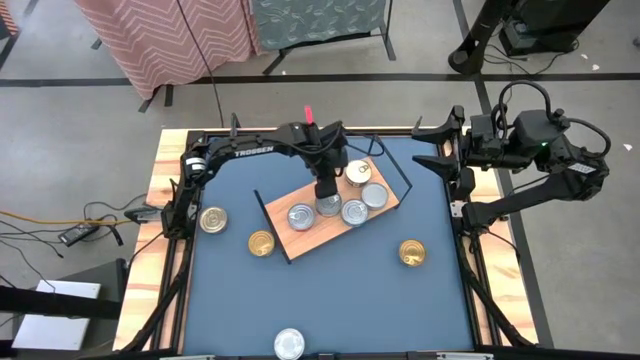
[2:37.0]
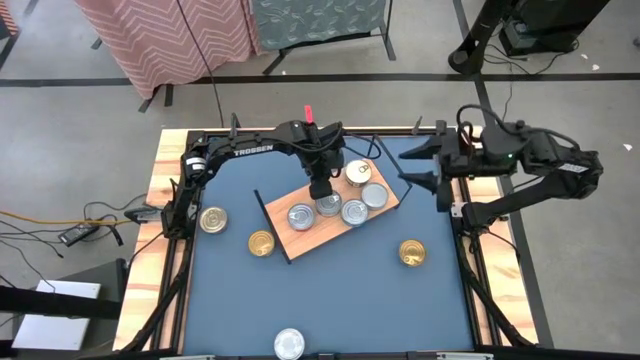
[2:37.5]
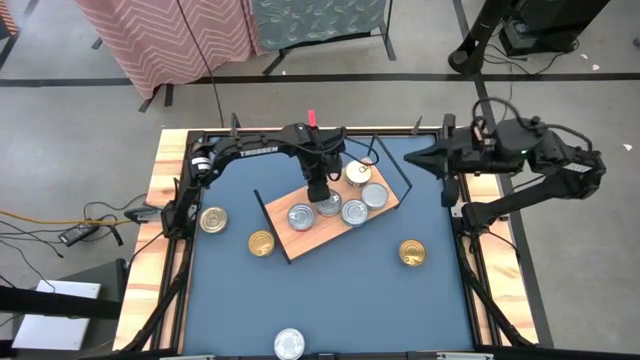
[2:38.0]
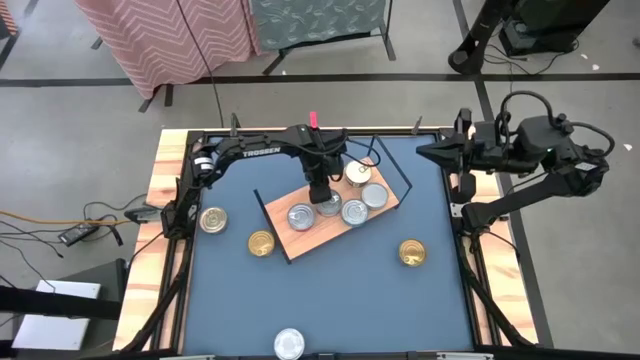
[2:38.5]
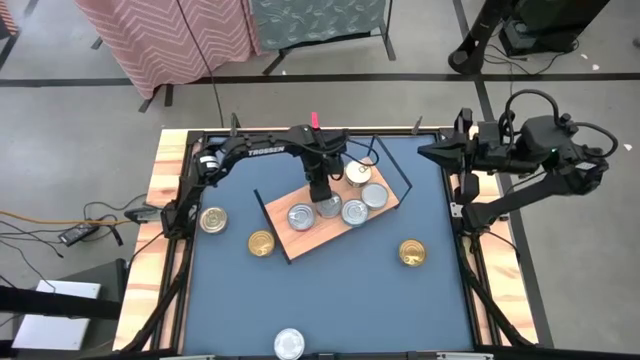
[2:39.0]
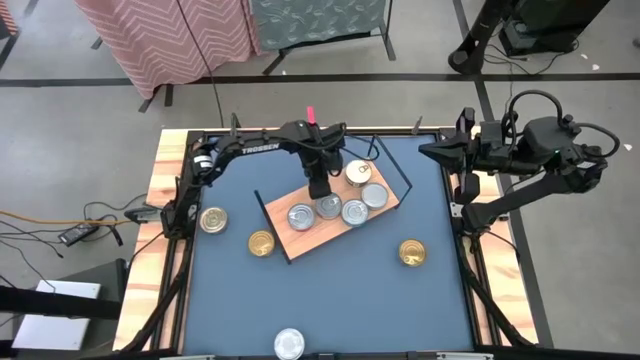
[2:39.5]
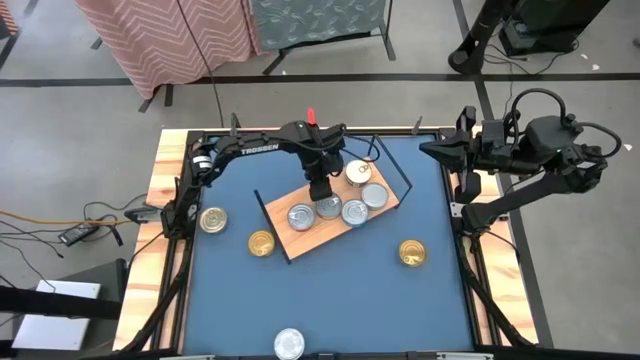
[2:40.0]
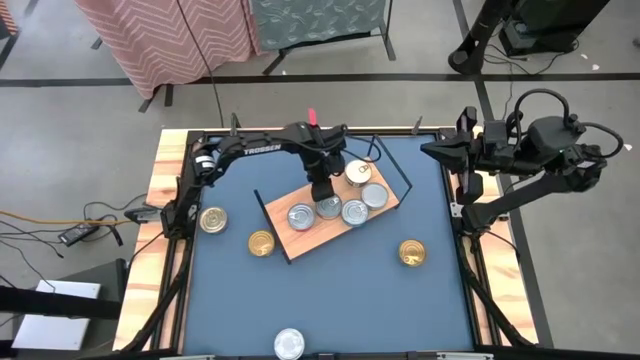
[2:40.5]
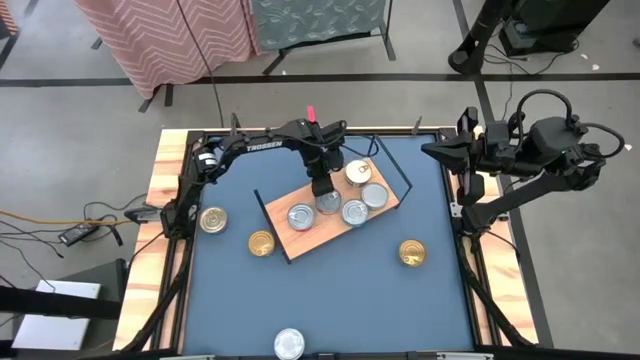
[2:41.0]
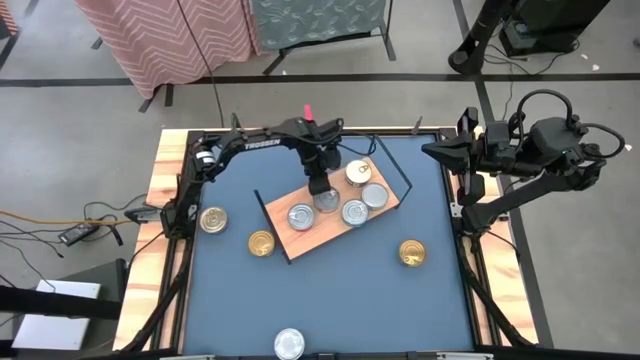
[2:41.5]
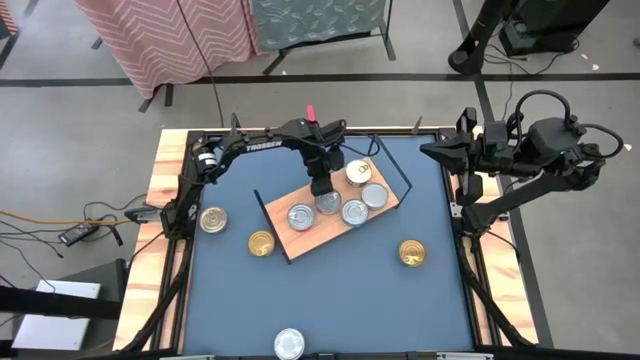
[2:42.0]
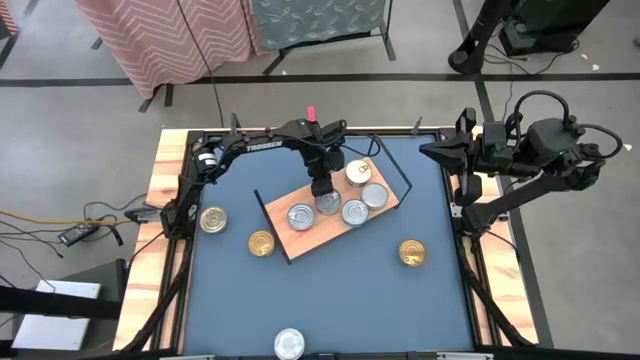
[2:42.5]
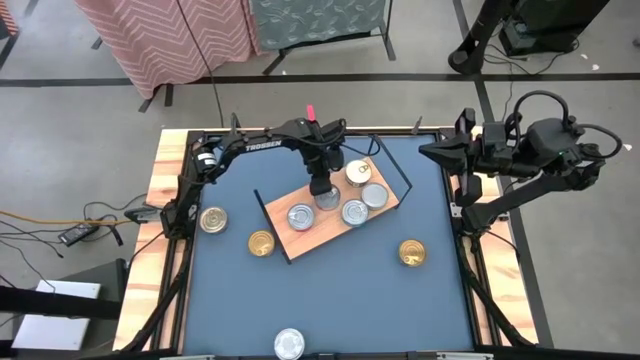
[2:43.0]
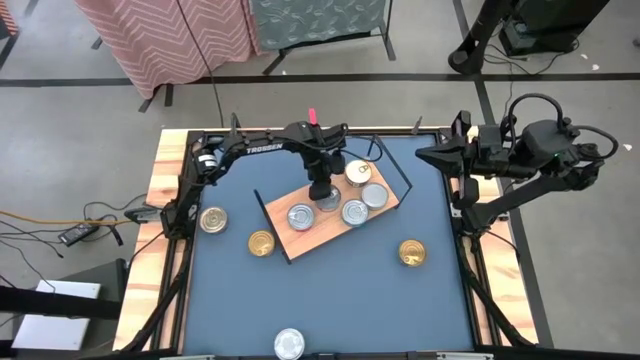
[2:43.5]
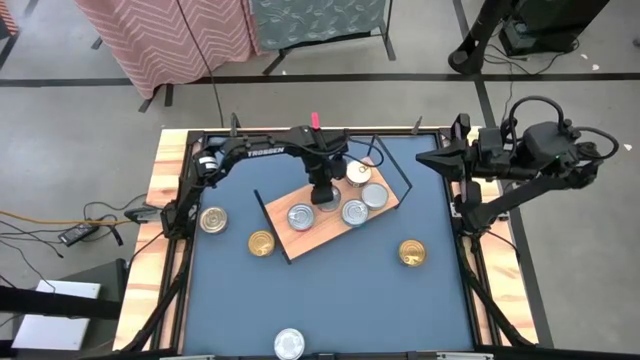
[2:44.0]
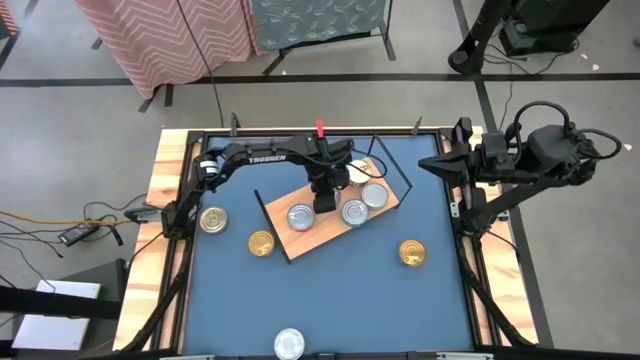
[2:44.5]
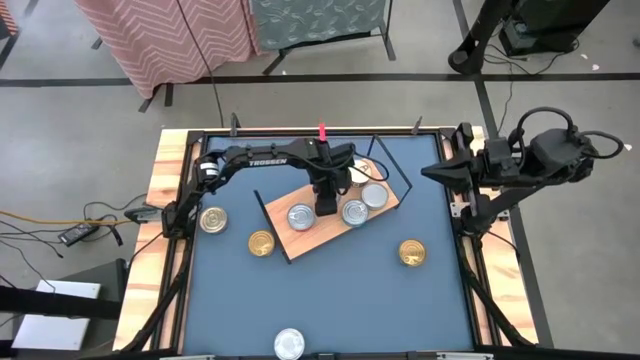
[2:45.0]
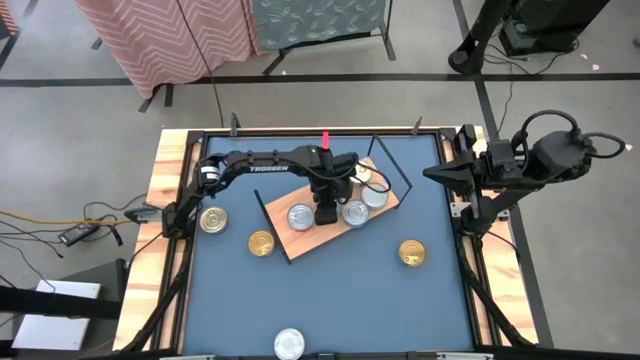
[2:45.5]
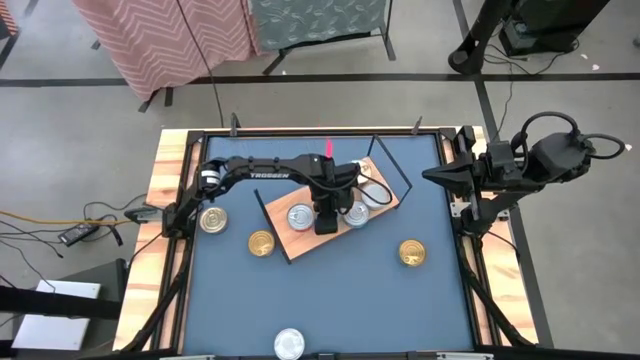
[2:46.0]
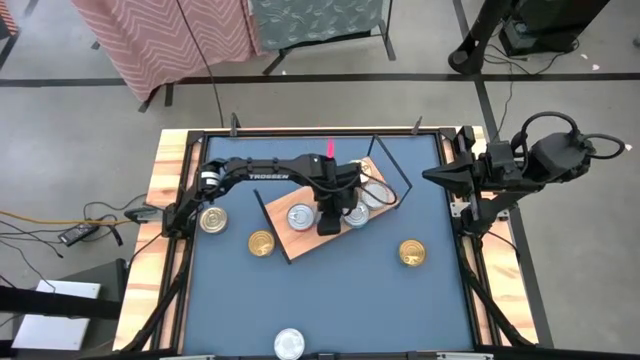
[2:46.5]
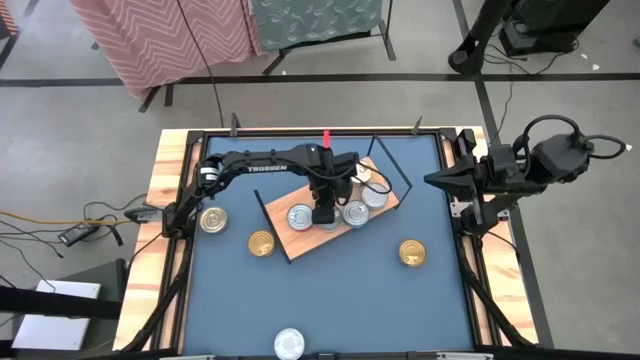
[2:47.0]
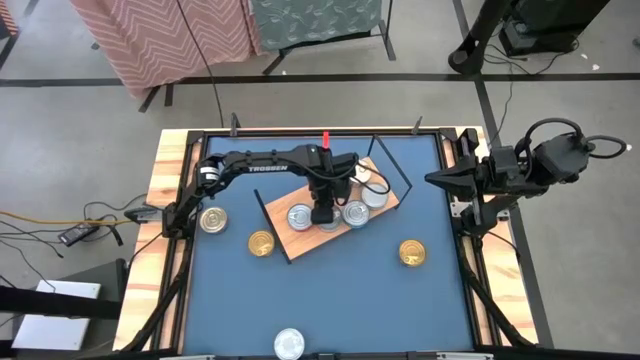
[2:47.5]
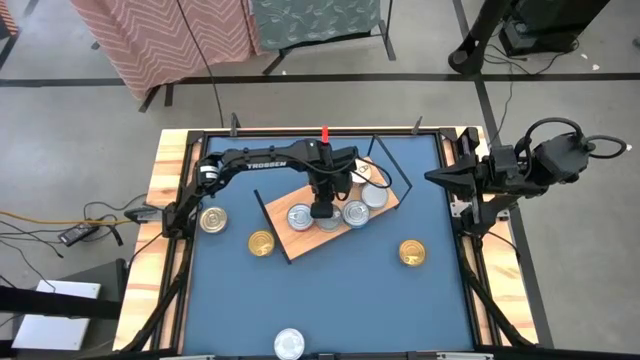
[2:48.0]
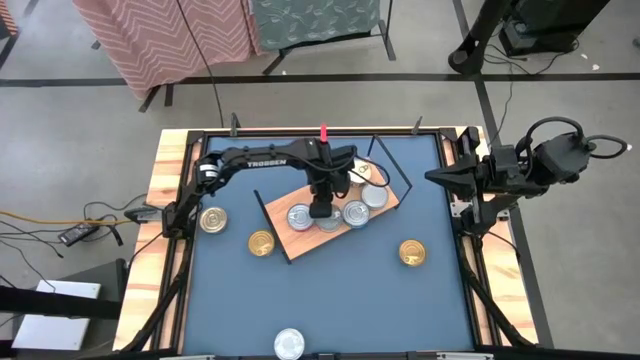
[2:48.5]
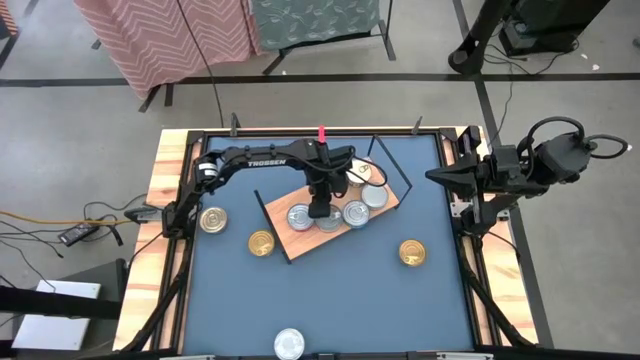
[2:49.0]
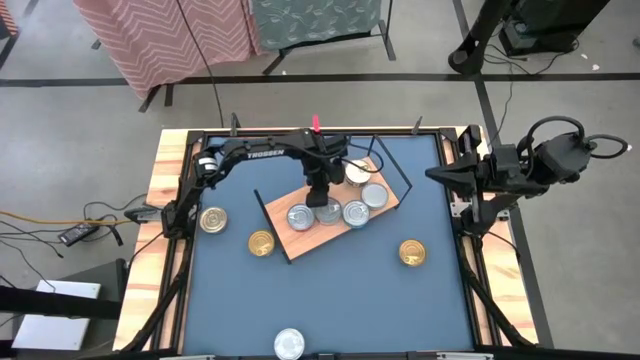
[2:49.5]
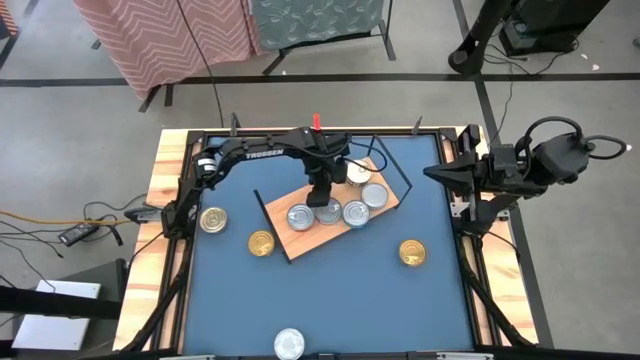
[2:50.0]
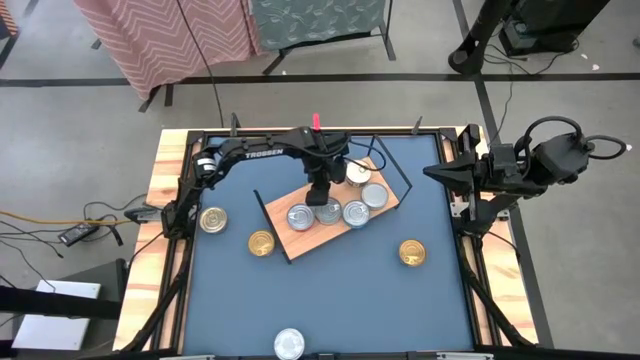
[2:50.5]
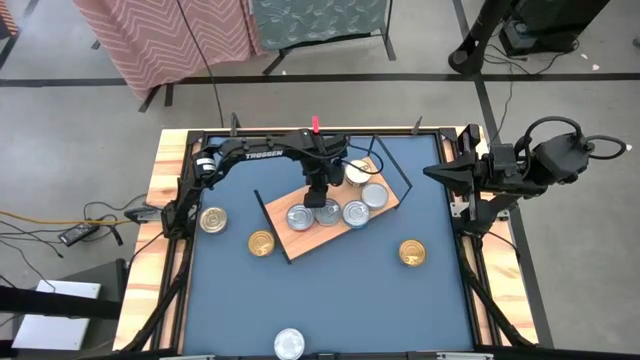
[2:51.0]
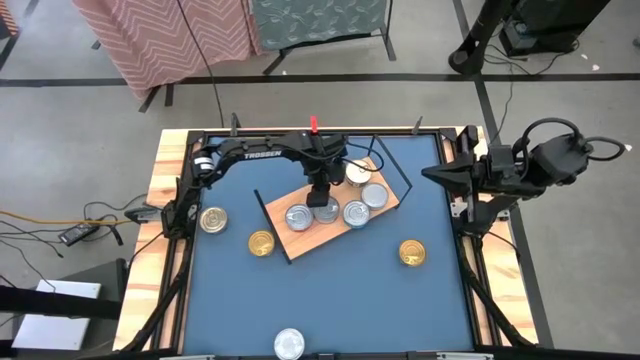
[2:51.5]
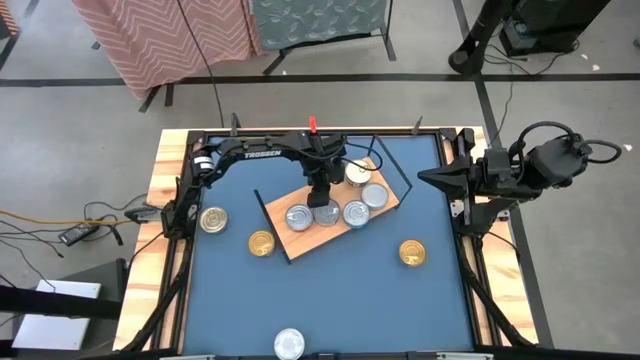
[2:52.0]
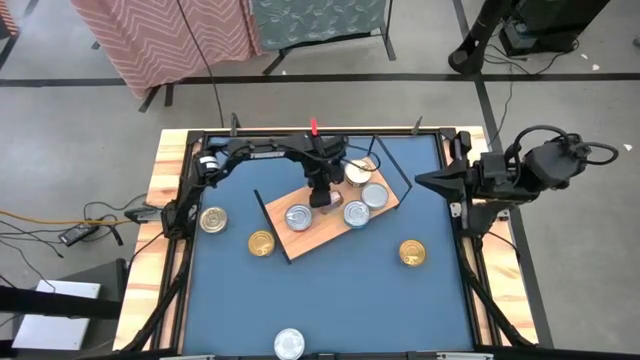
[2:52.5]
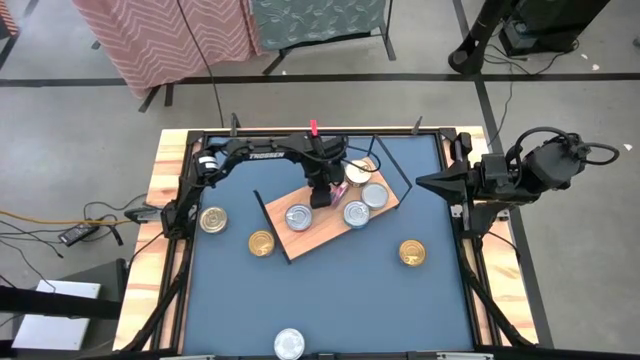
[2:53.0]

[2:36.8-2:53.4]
Task: Stack canned seafood by type on shelf
Stack the red tuna can on top of the red tuna can on the shelf

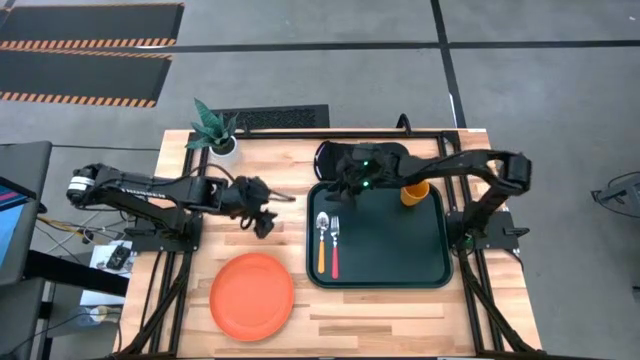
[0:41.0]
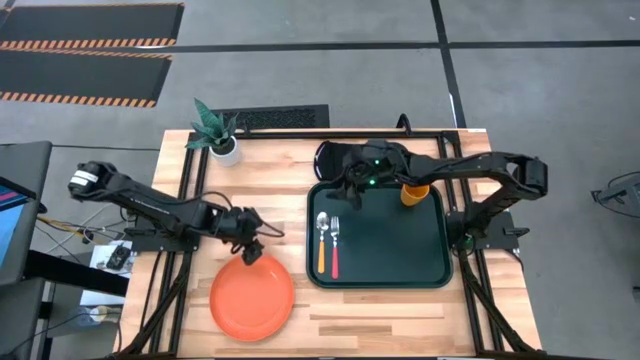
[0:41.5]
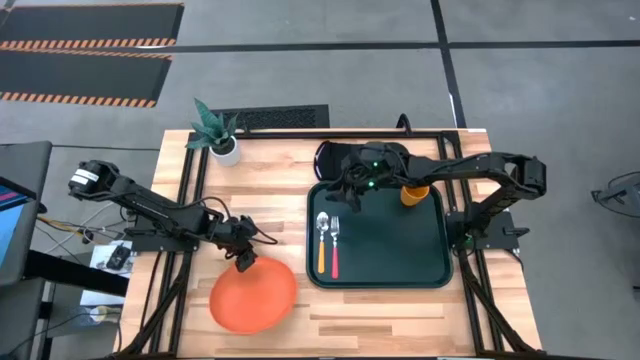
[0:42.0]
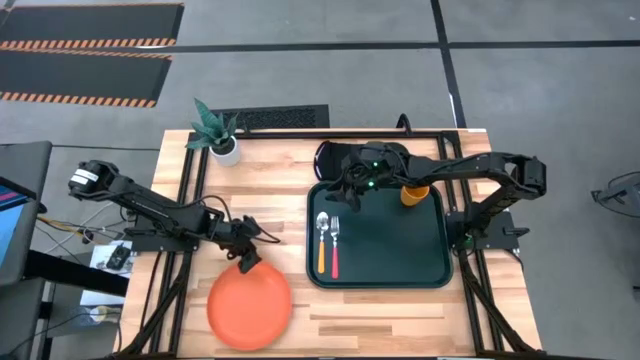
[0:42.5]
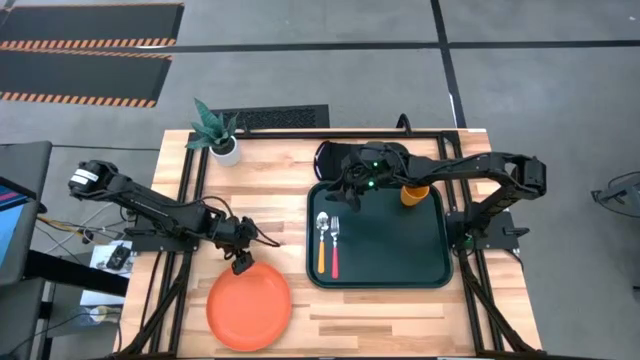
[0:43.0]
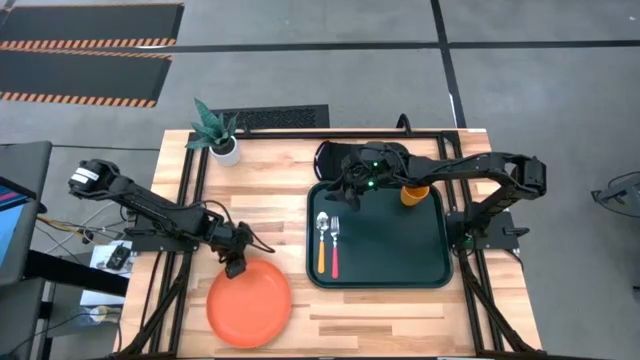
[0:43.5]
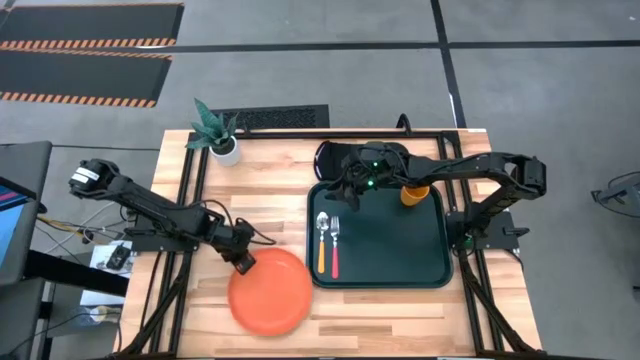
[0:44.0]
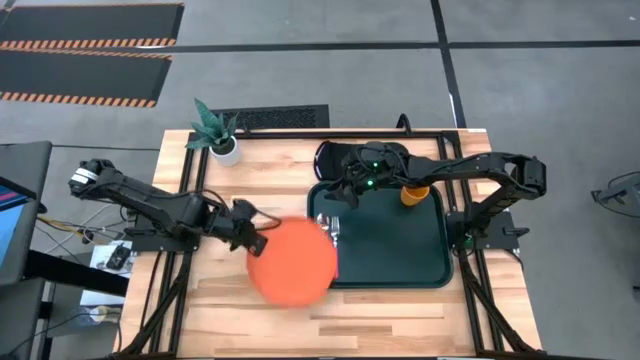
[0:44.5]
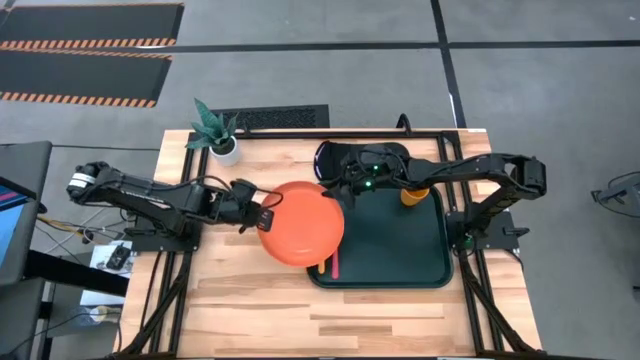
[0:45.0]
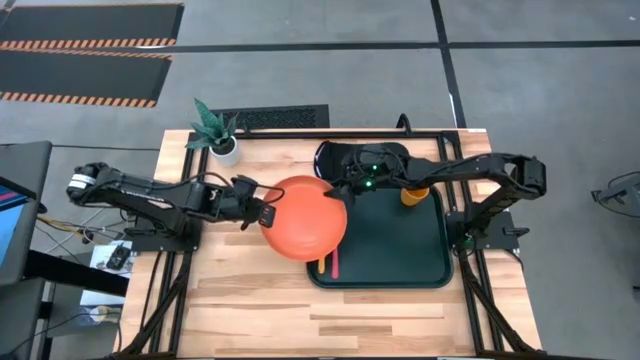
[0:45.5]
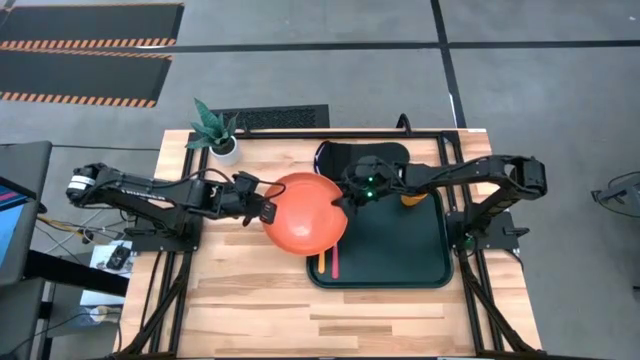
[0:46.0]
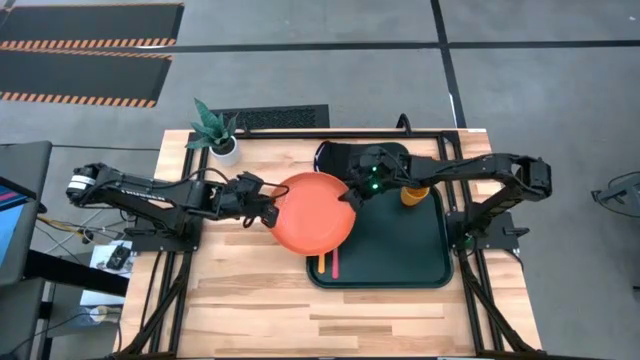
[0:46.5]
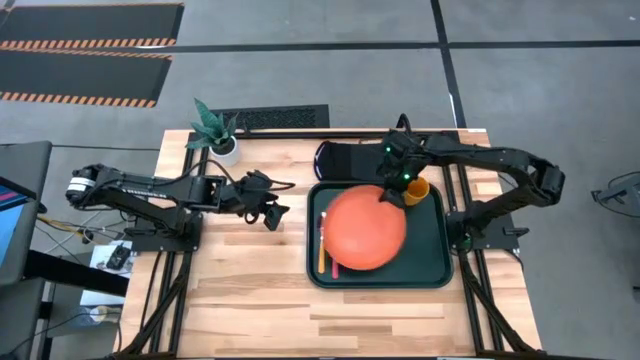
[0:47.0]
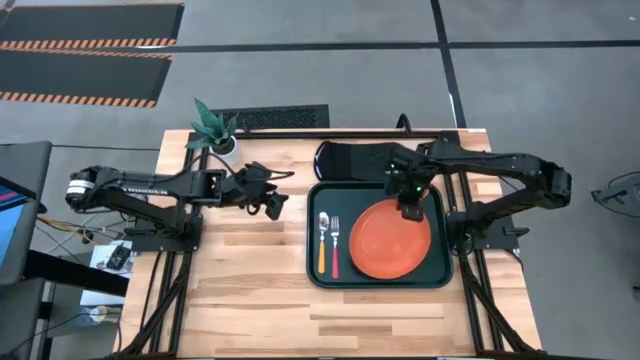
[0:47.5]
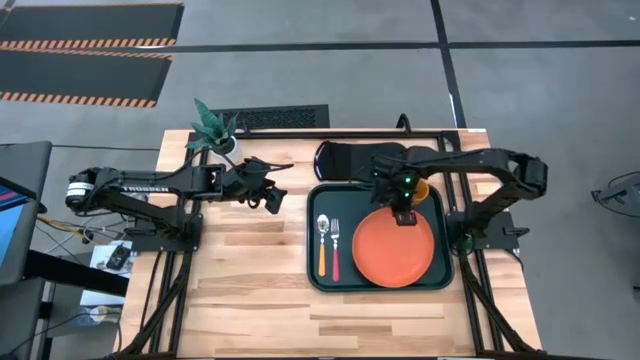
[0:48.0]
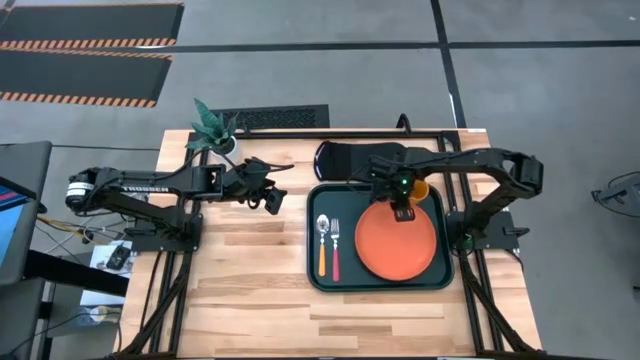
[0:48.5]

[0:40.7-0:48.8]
Task: Pick and place plate/cup/fork/spoon on tray
Put the orange plate to the right of the pink fork on the green serving tray
